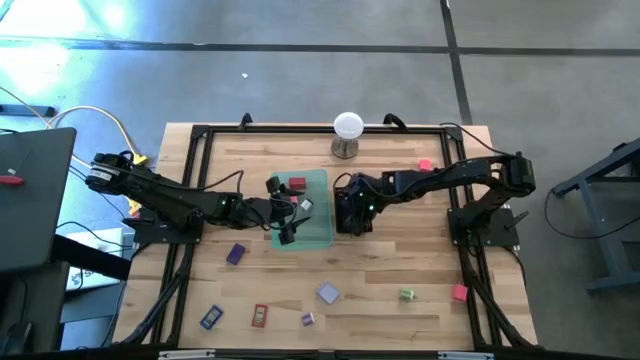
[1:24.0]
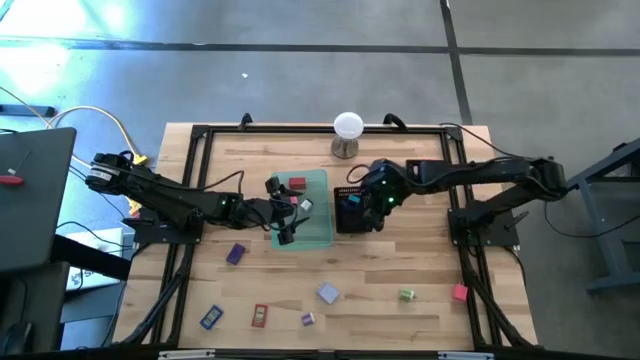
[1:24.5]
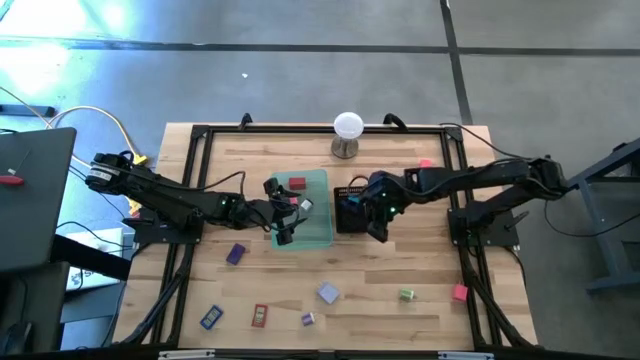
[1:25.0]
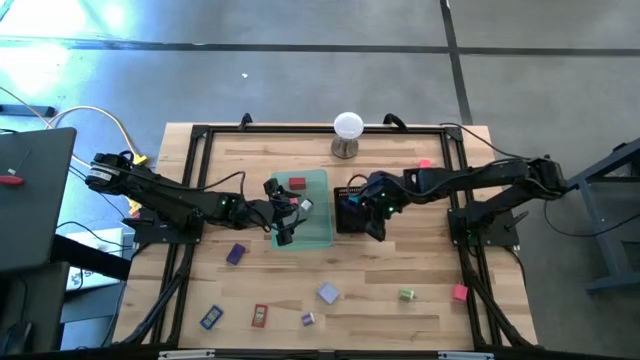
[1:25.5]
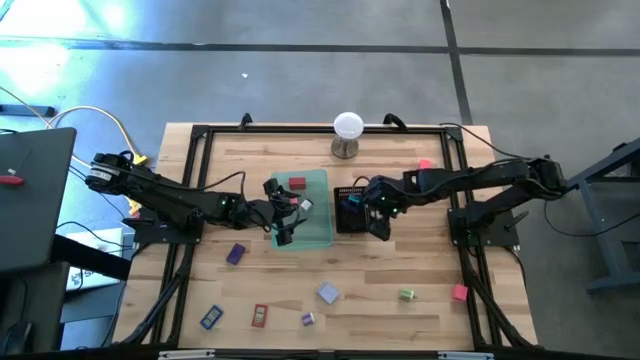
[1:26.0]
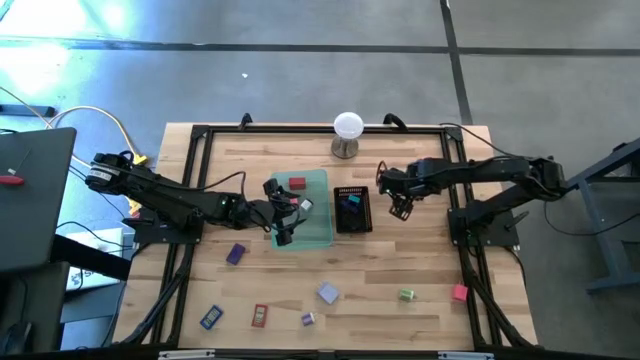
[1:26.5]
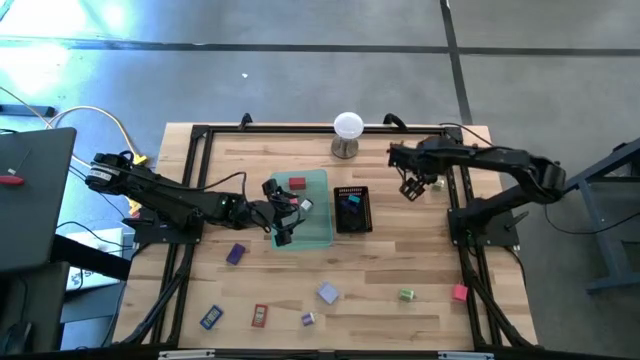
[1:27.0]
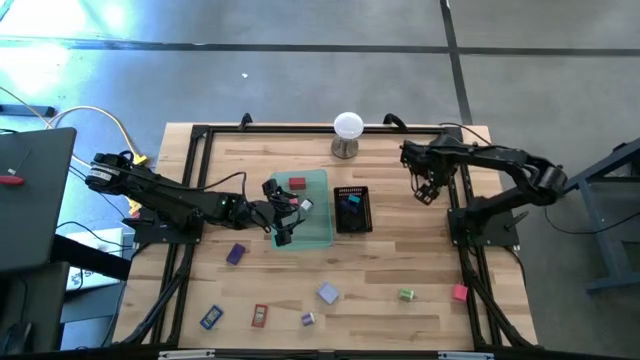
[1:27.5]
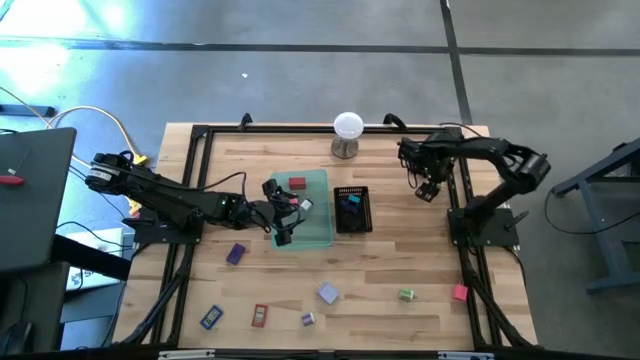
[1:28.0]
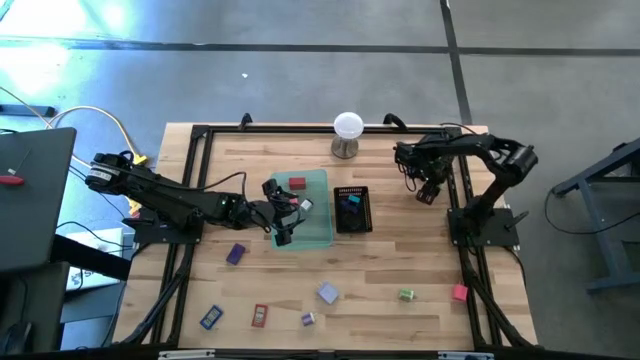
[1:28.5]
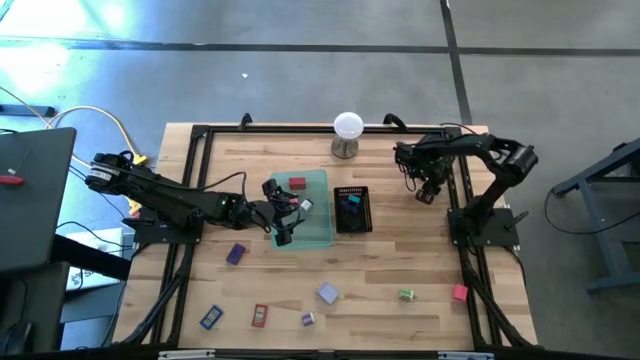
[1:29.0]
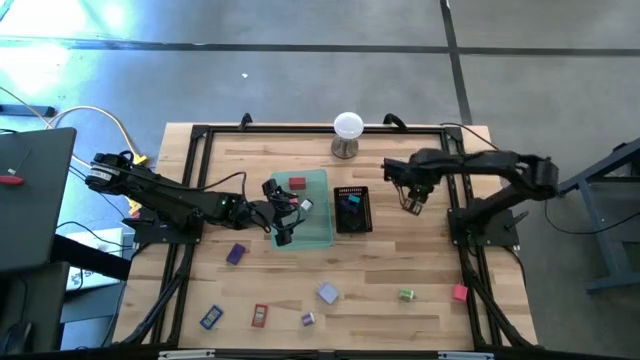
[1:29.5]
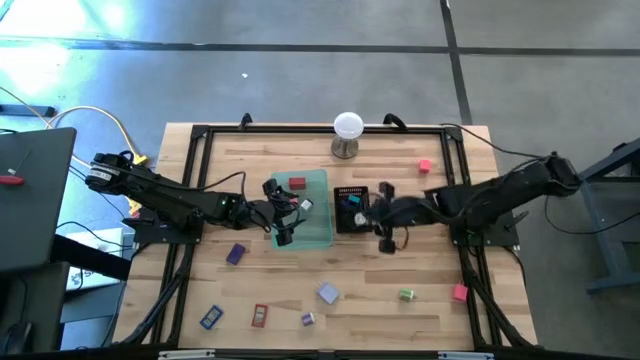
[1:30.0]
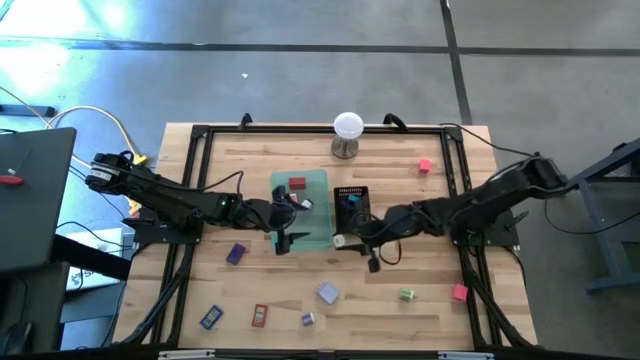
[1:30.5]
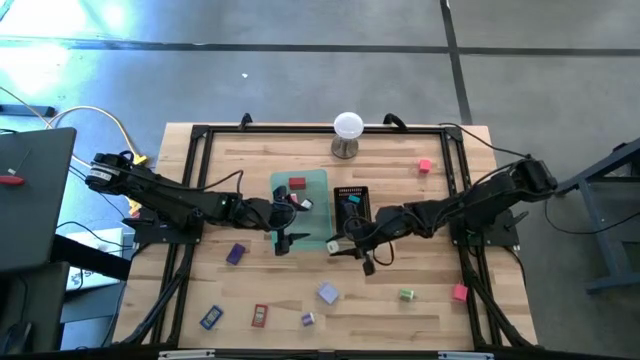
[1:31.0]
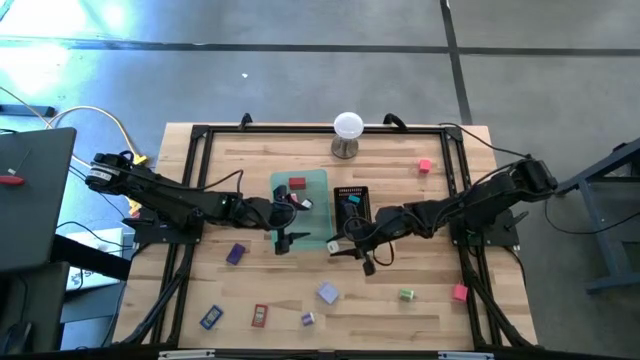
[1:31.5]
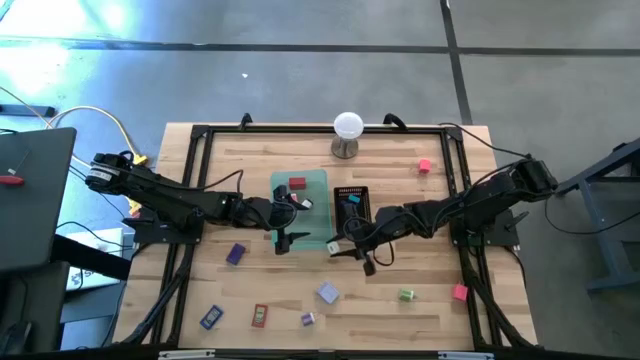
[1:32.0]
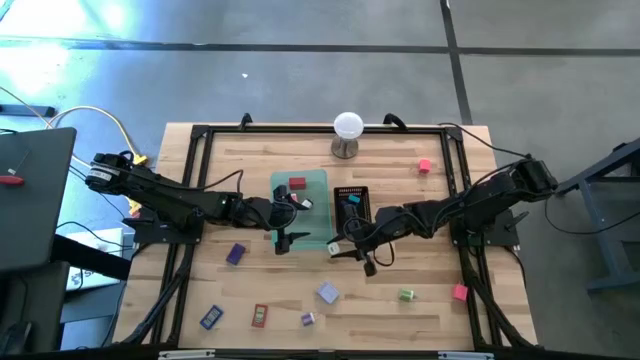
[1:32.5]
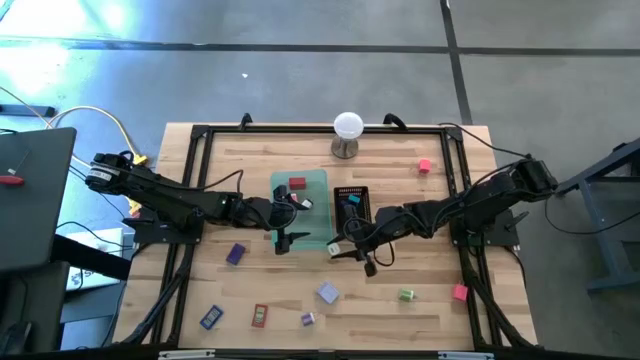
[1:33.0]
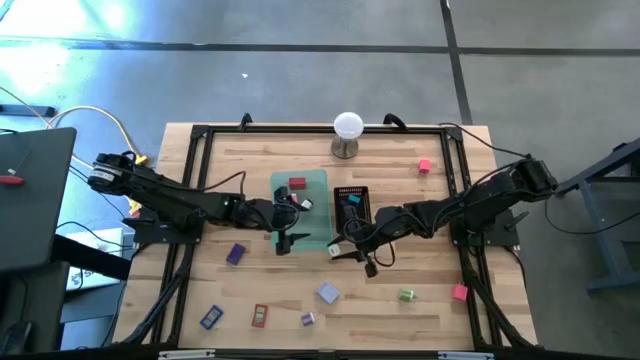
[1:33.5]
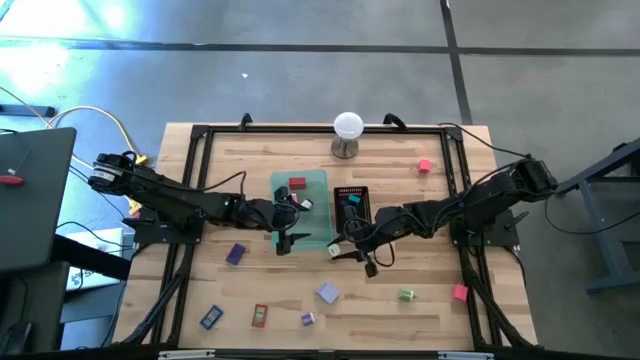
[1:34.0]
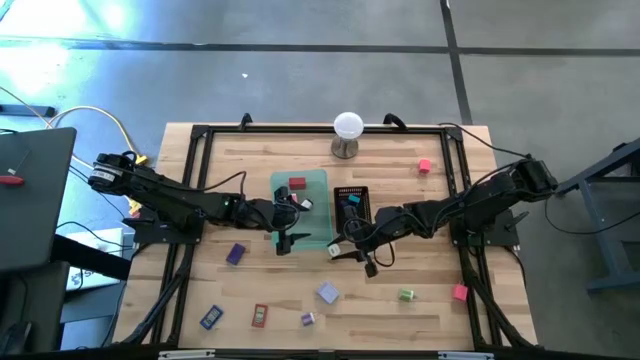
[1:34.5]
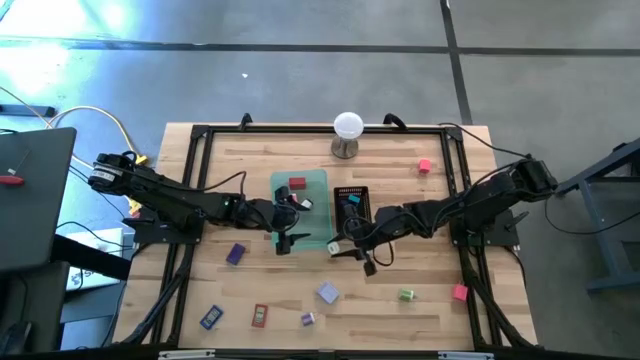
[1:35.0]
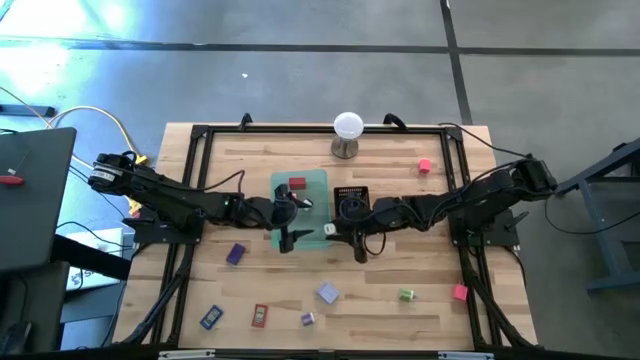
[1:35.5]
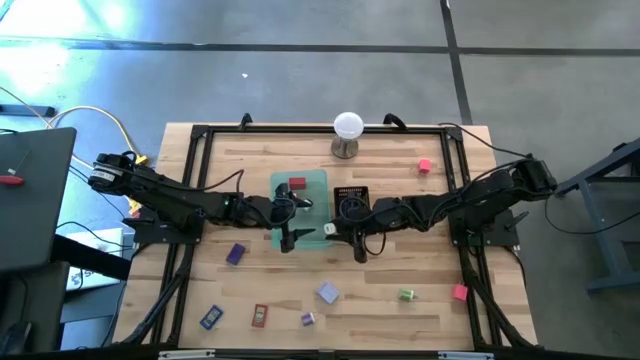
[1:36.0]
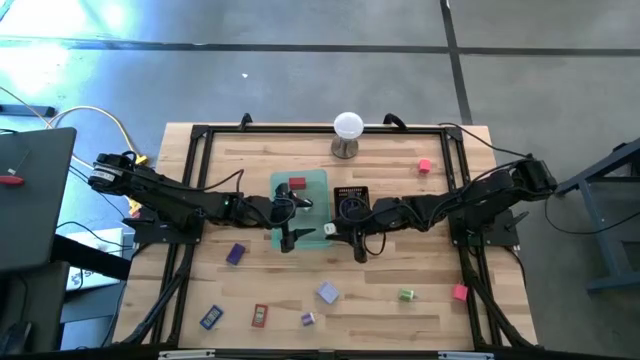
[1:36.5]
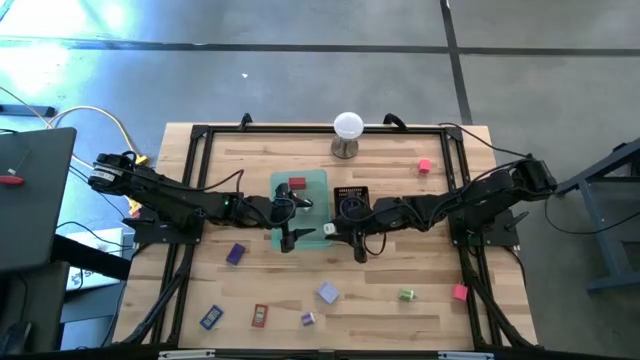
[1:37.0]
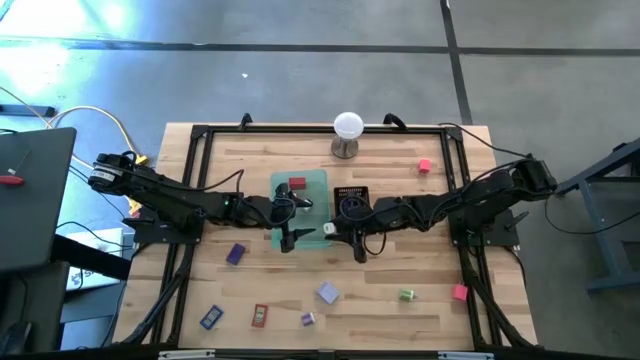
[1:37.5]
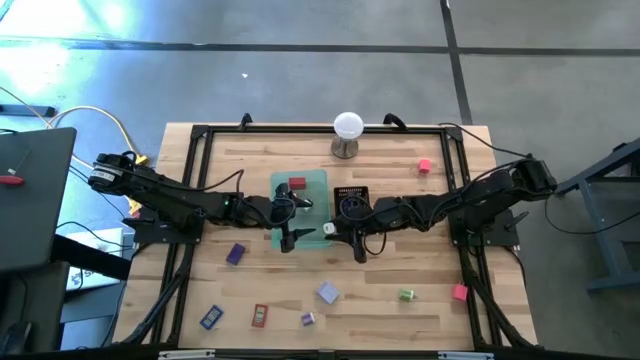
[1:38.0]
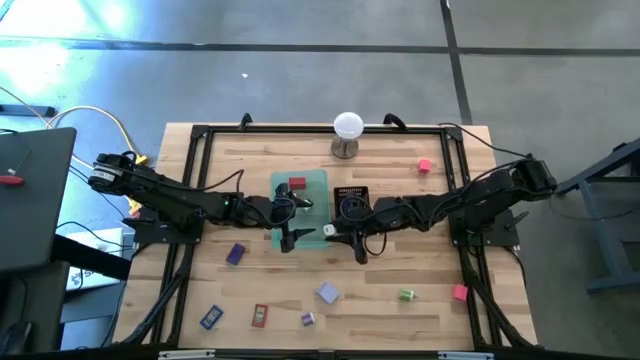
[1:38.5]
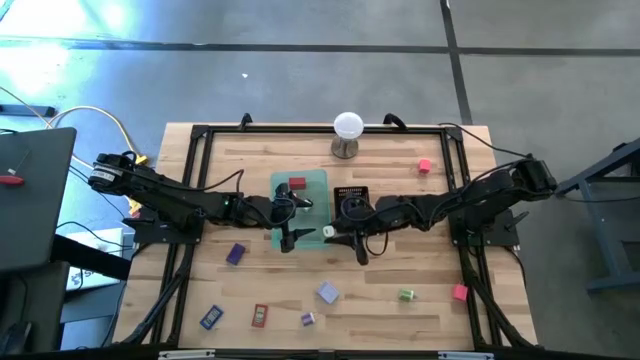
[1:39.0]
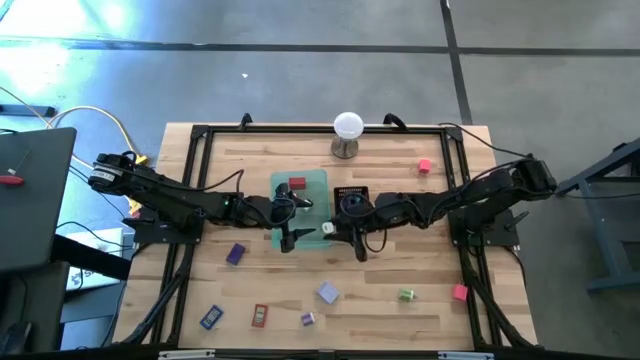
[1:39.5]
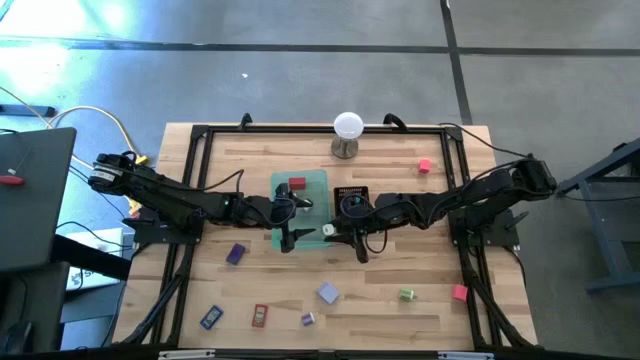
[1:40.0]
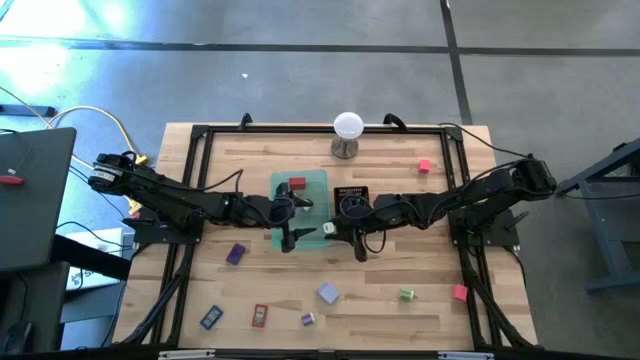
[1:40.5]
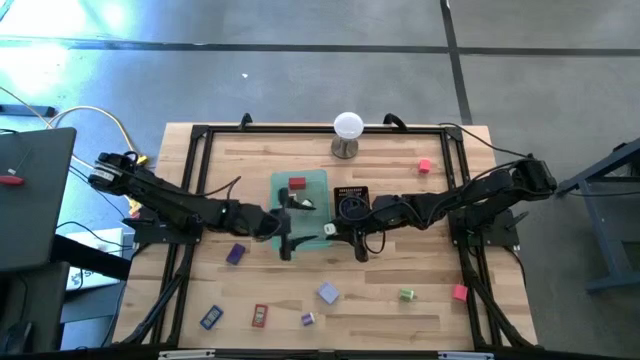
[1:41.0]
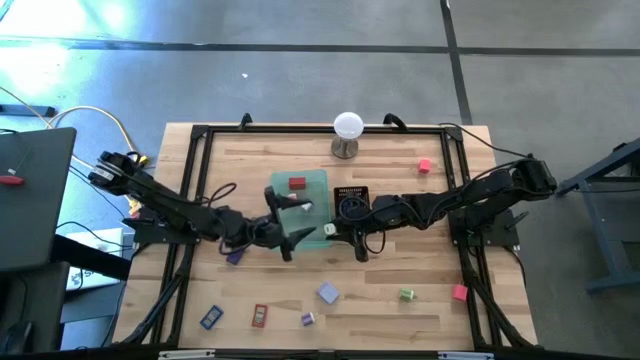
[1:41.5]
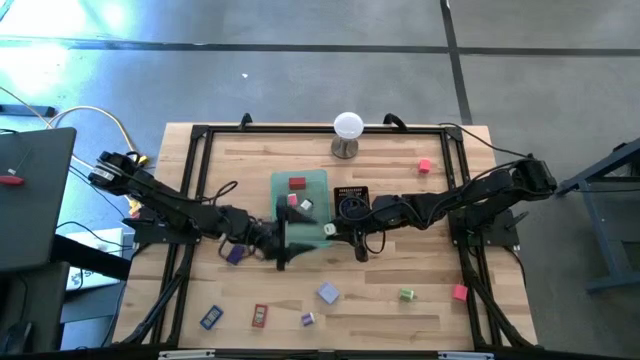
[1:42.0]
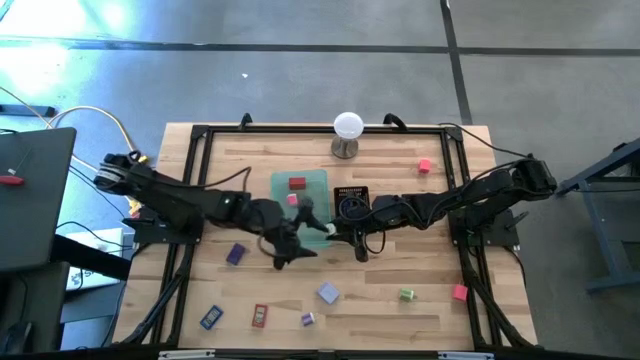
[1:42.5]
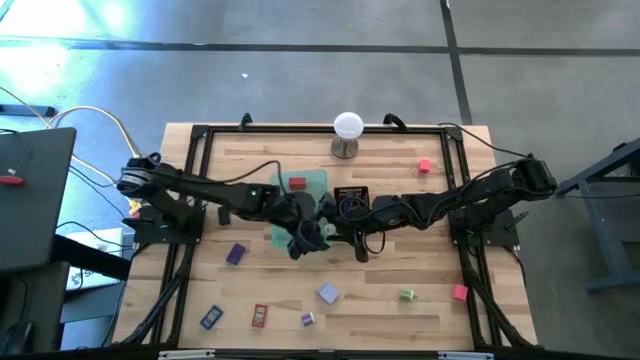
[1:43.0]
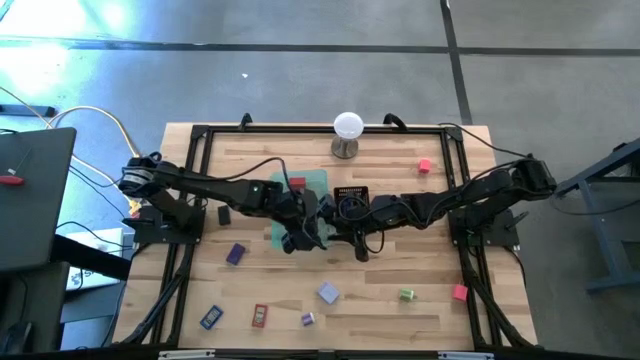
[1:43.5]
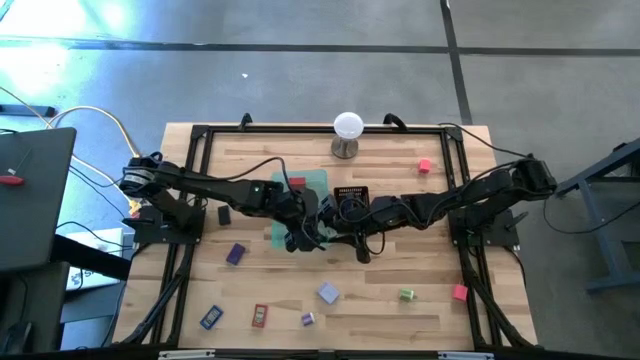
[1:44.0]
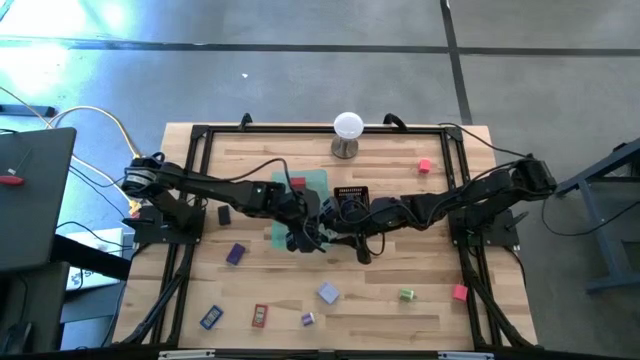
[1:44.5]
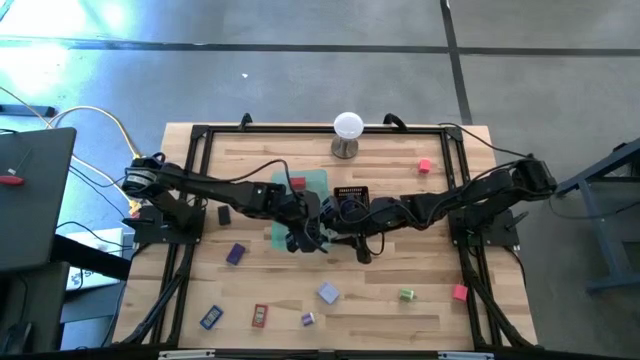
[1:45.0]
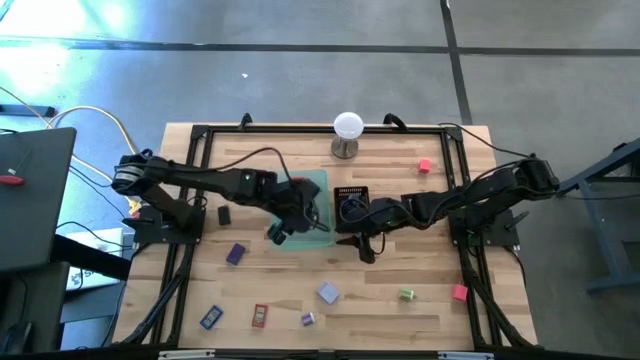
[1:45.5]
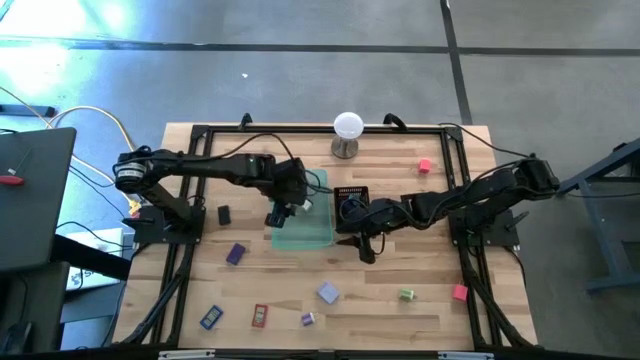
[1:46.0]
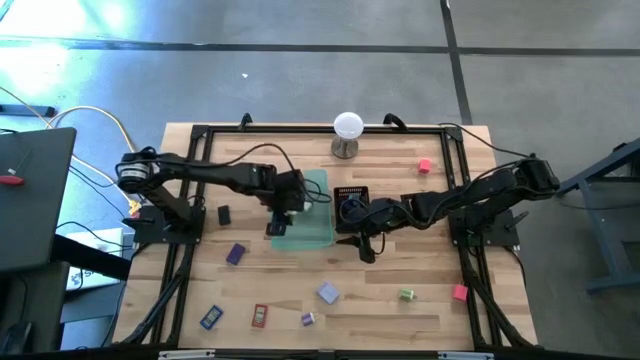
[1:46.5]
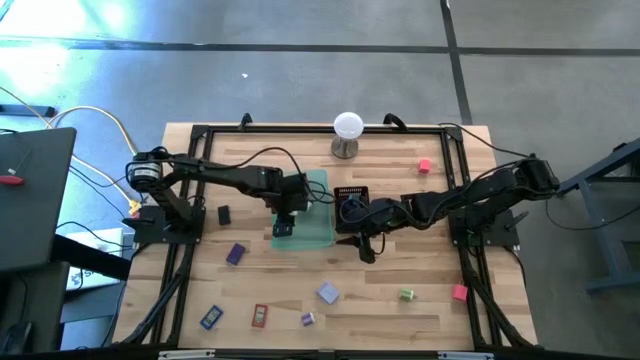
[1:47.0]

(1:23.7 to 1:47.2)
Task: Pick & Place Office items
Put the green charger adapter into the blue bin
